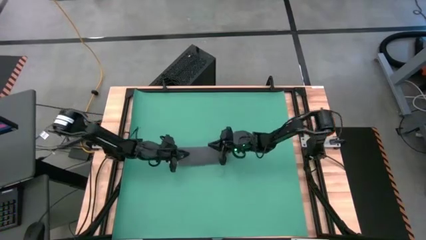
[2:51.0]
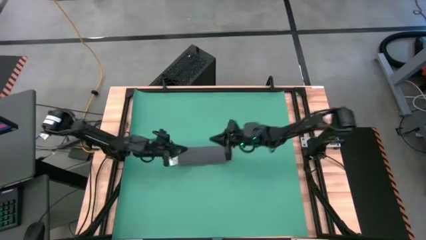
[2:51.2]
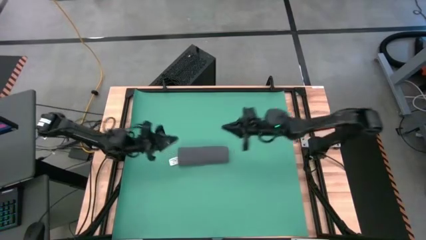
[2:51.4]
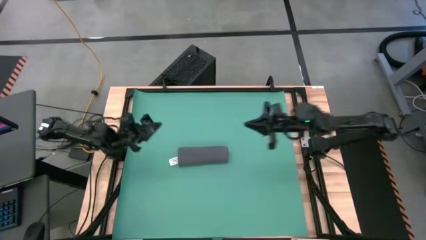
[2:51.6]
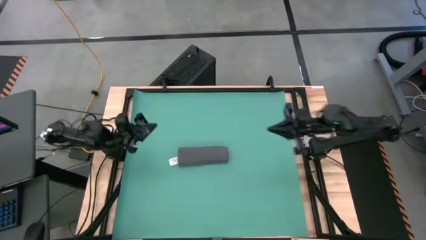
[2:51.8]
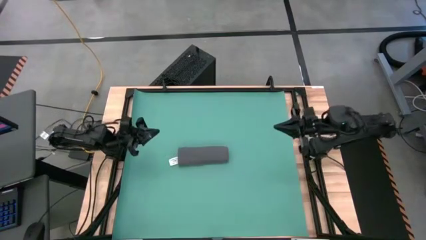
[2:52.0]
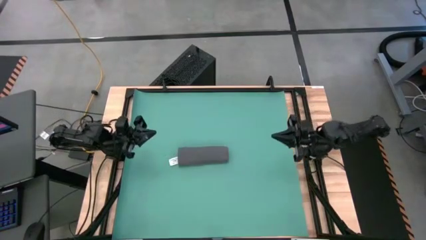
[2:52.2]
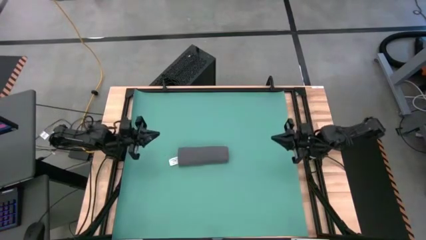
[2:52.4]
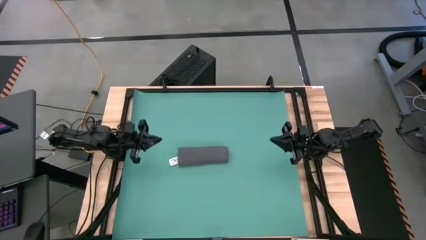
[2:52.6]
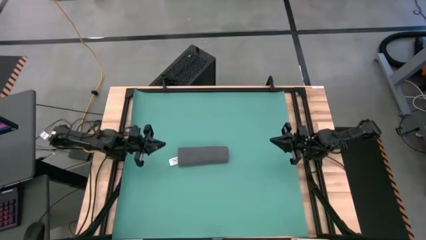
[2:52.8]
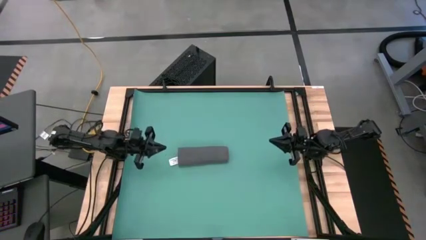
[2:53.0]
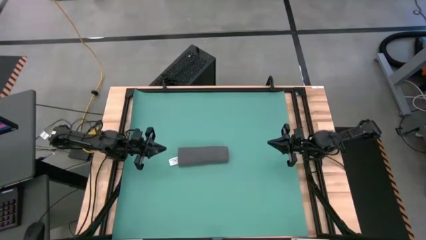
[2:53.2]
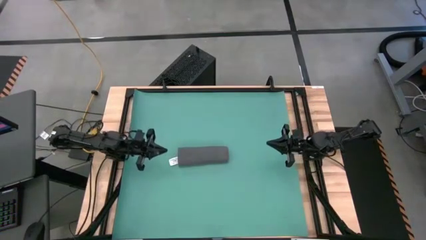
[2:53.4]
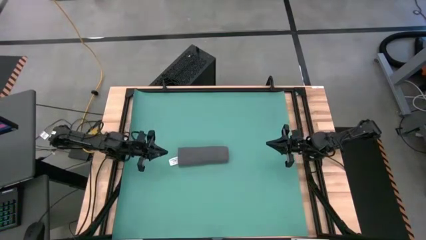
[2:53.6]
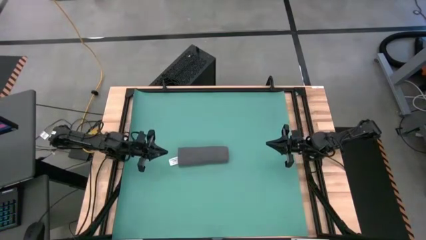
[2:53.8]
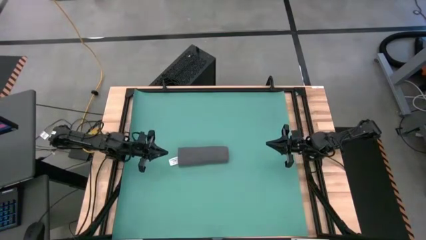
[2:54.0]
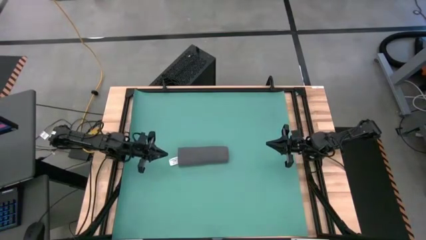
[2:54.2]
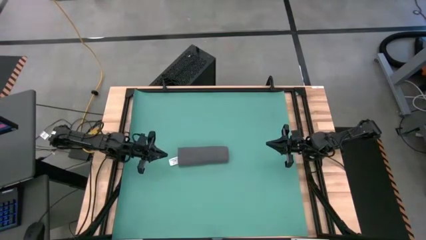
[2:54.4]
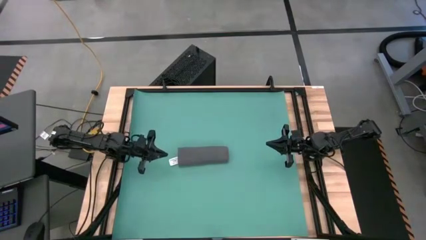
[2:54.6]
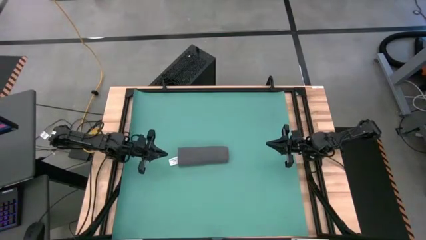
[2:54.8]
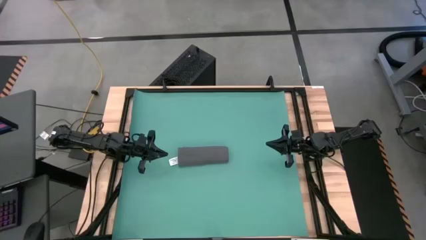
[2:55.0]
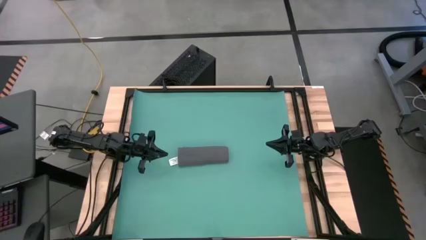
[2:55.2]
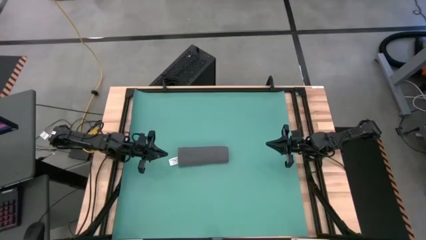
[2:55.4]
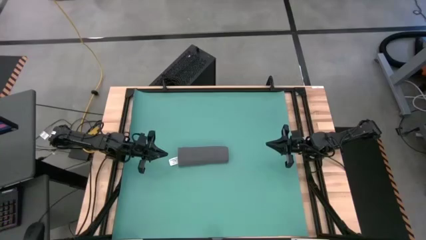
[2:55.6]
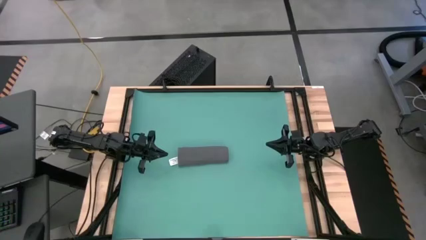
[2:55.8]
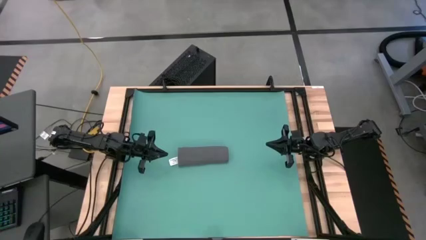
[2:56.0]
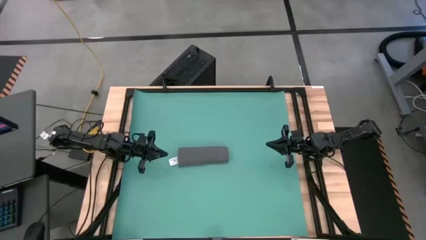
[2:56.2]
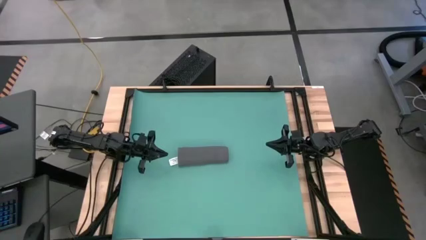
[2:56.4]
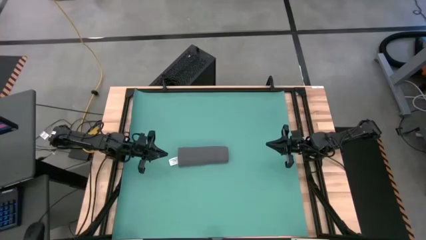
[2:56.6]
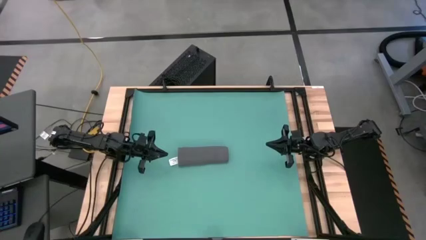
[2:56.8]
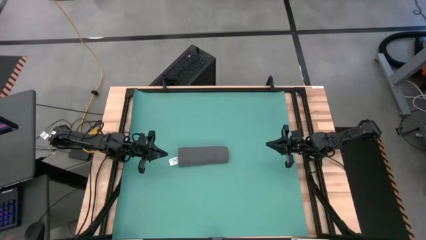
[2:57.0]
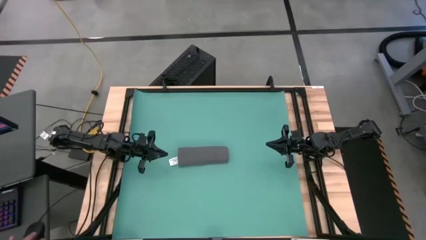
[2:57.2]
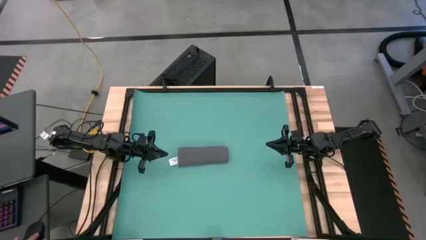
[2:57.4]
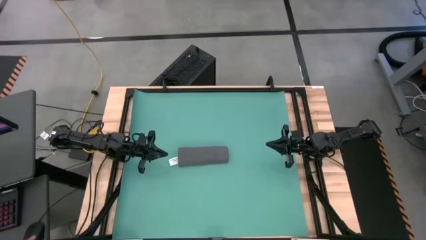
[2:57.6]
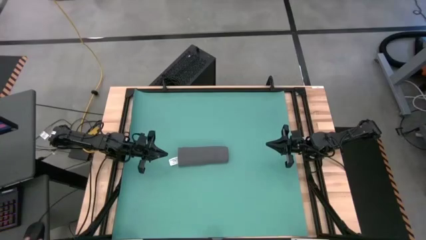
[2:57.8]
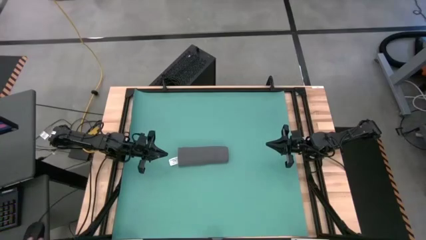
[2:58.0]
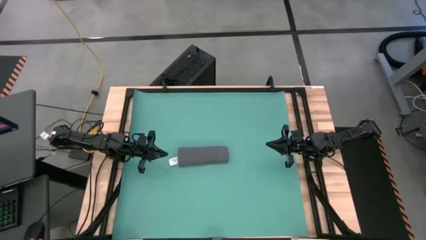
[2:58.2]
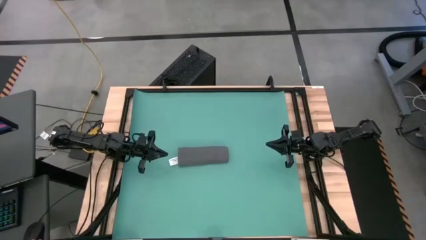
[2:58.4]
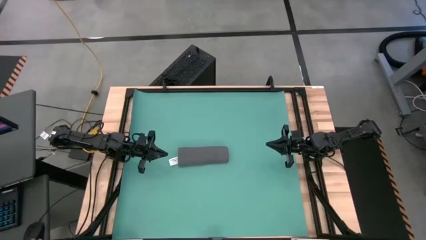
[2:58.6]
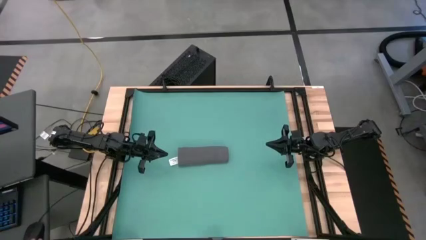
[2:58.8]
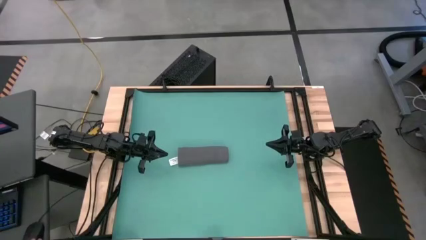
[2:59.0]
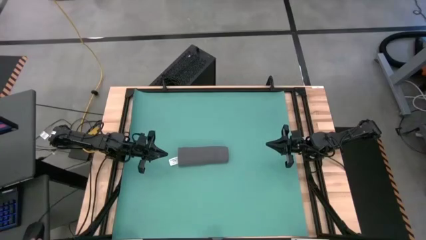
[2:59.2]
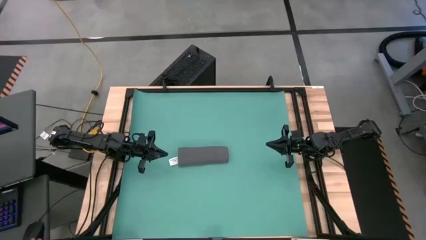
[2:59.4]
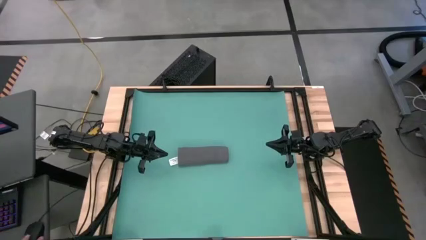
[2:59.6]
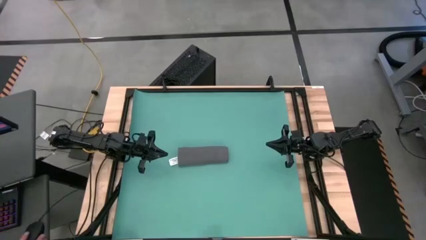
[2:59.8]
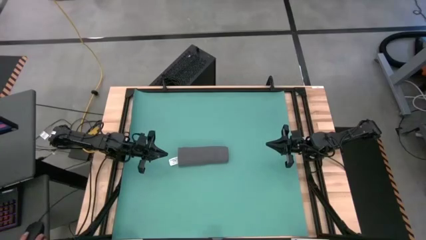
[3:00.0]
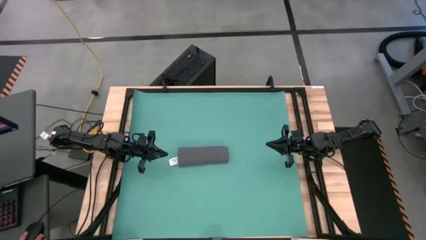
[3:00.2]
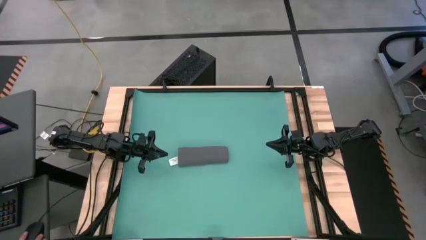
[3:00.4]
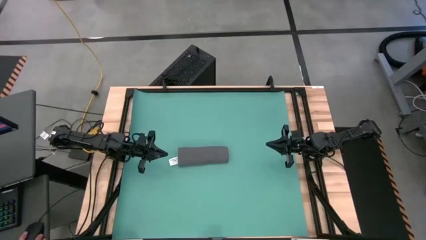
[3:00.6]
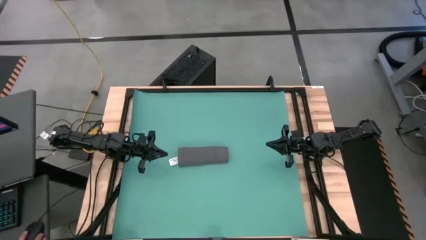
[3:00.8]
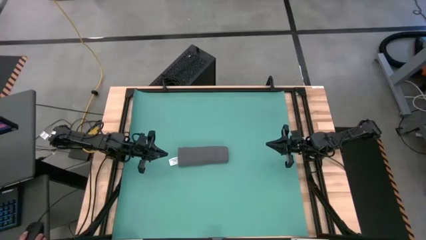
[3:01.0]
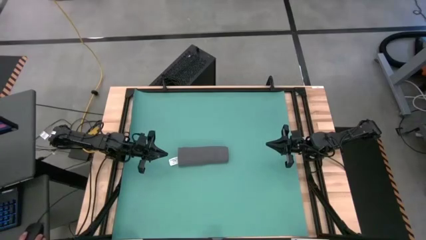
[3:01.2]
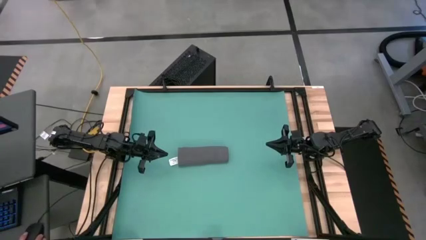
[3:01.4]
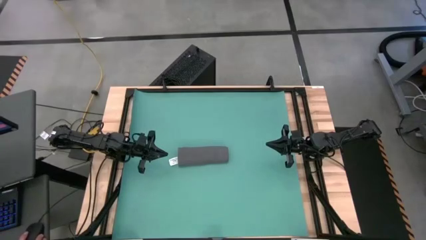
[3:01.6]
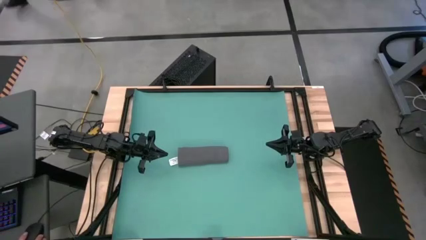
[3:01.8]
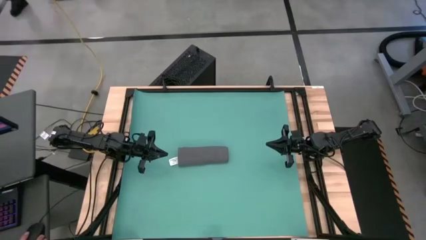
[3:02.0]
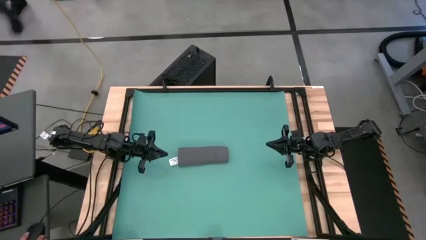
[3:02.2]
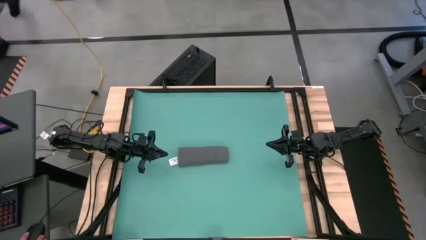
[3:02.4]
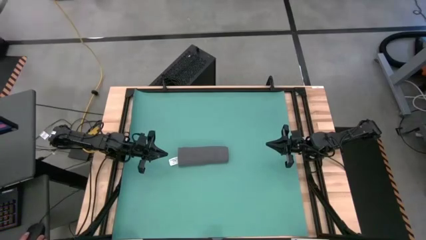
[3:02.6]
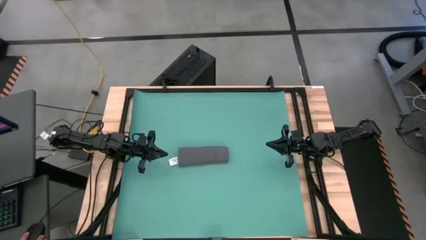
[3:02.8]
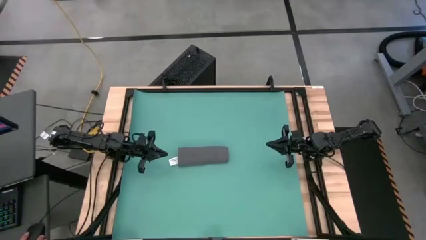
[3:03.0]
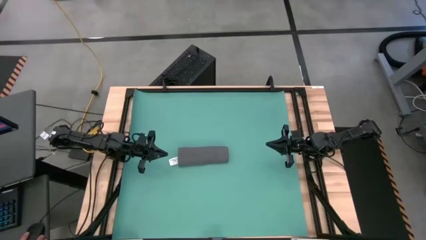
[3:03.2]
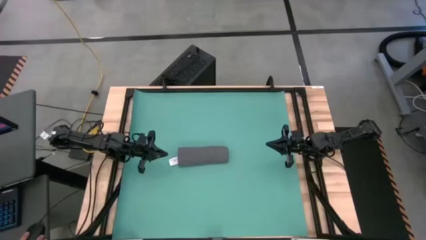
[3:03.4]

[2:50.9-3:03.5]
Task: Roll towel
Return to Home Position

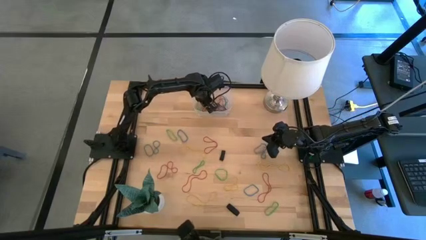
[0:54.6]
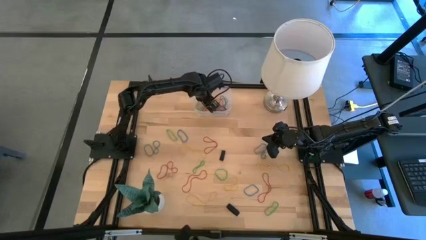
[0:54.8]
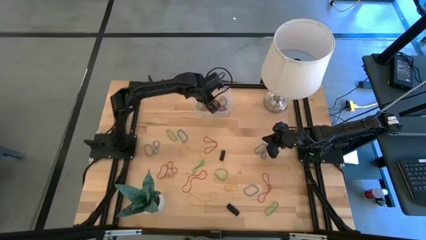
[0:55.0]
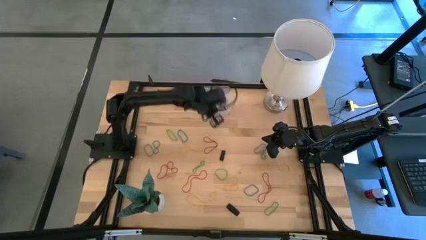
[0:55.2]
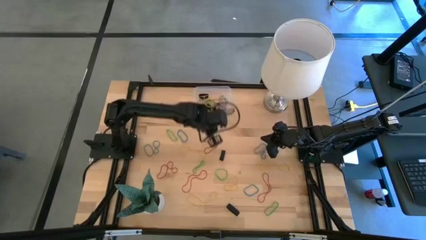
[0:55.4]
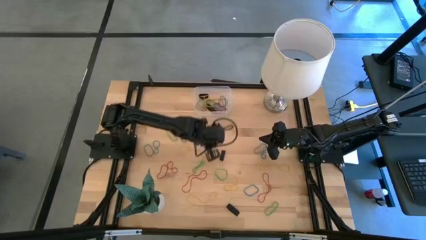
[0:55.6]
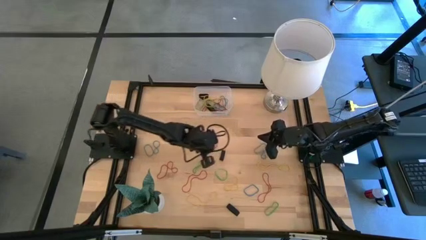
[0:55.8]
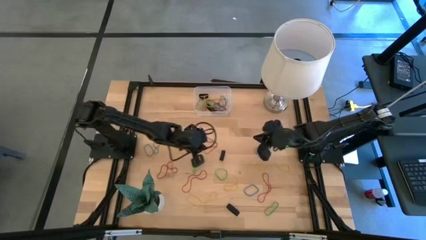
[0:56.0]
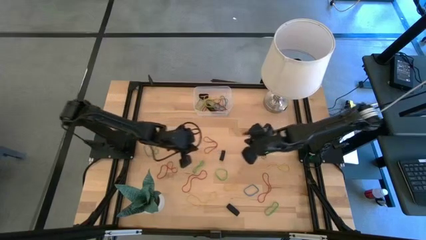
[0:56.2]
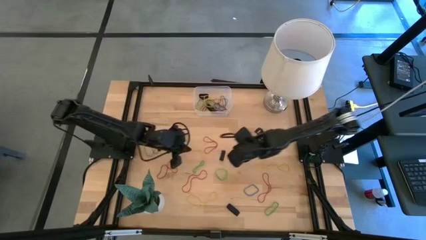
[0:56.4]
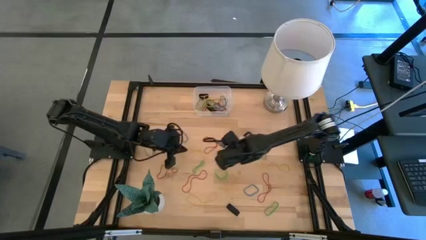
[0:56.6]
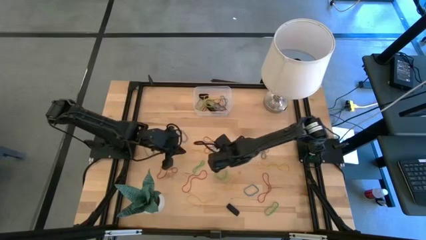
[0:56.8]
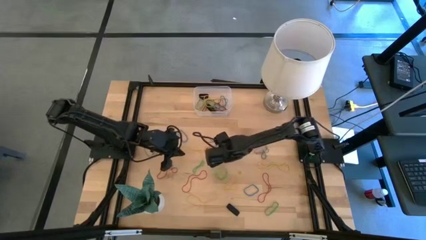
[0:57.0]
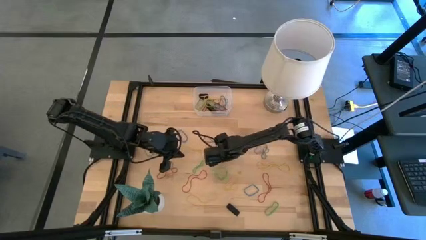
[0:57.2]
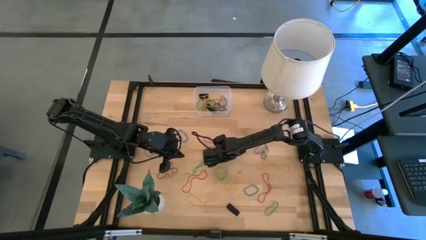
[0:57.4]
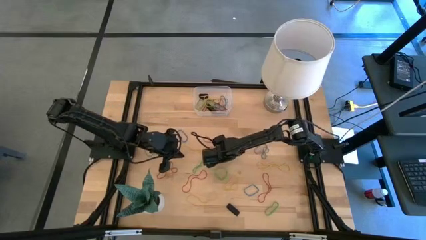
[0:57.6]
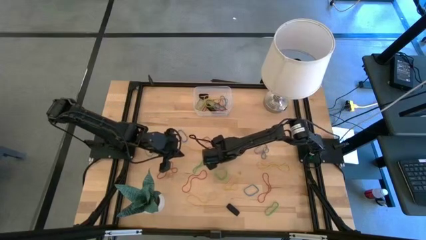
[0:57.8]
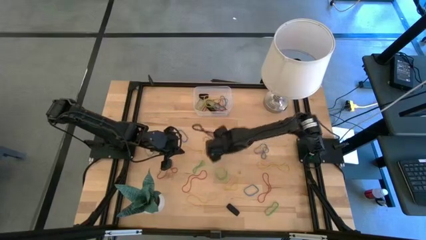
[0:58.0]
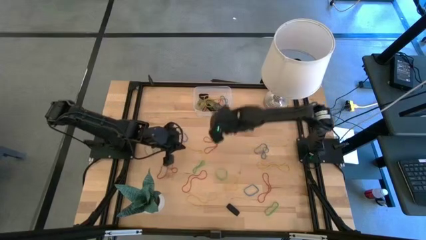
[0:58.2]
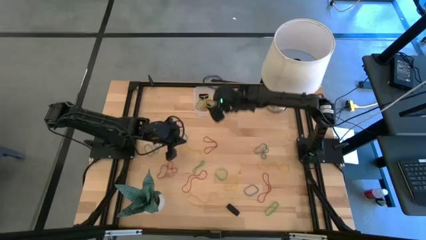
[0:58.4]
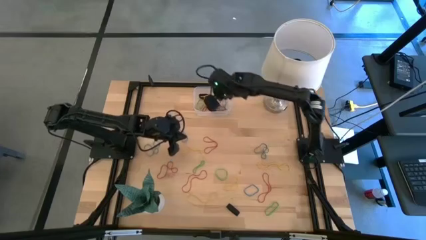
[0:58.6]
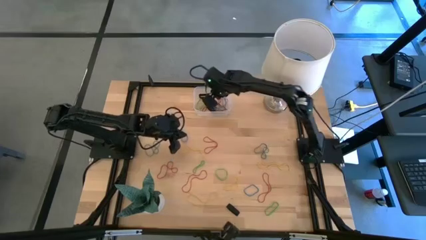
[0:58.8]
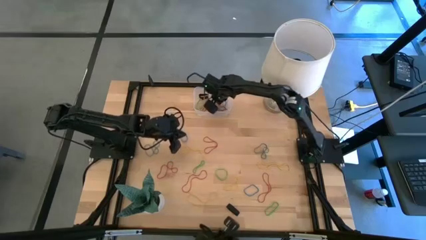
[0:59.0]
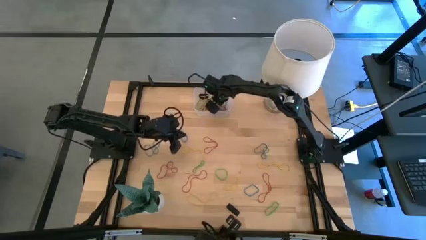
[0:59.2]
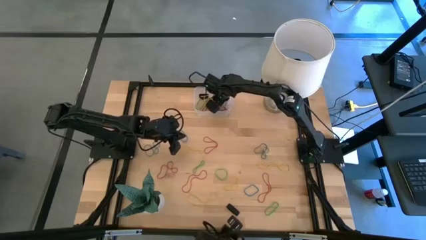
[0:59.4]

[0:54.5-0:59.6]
Task: Pick and place rubber bands into bin
Put the black rubber band into the transparent bin
